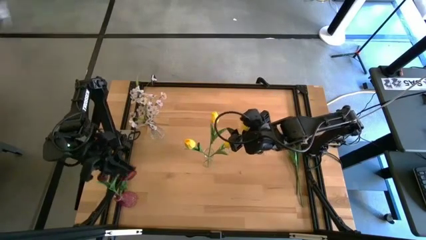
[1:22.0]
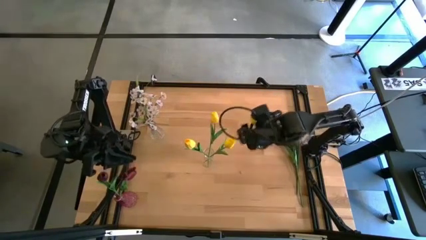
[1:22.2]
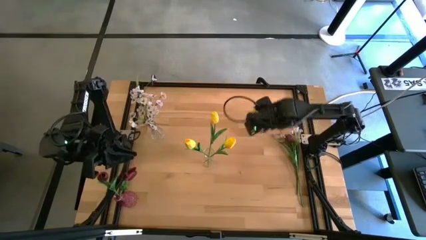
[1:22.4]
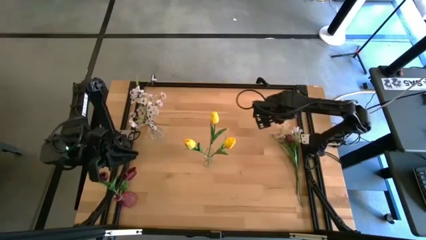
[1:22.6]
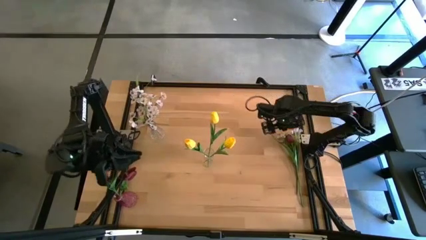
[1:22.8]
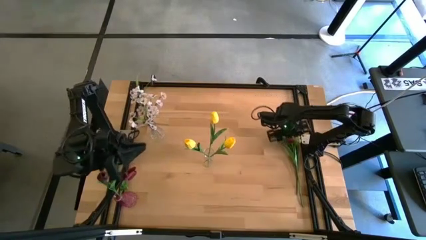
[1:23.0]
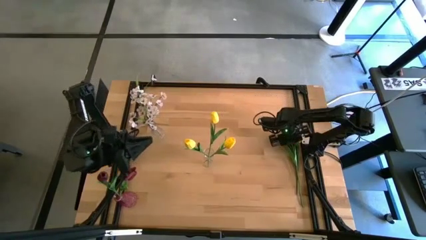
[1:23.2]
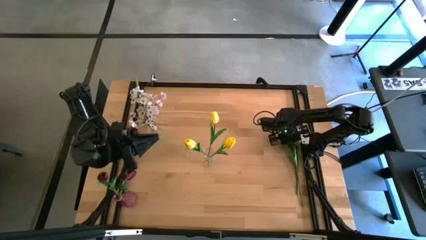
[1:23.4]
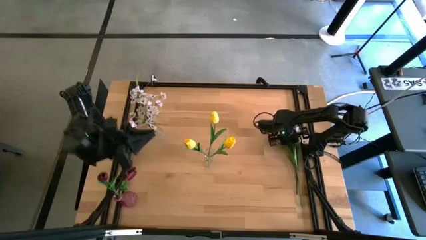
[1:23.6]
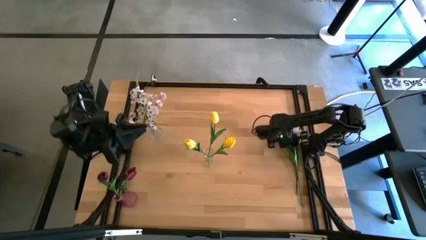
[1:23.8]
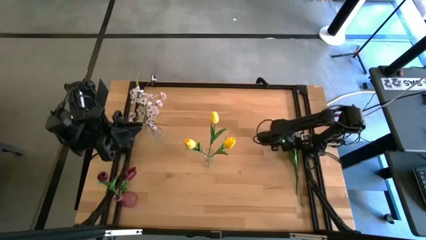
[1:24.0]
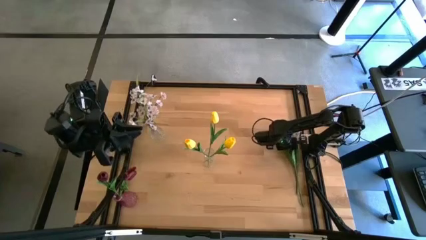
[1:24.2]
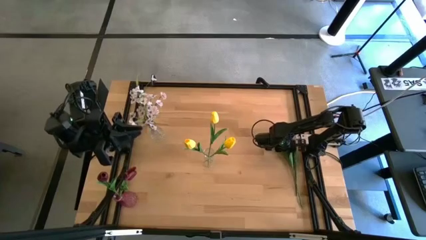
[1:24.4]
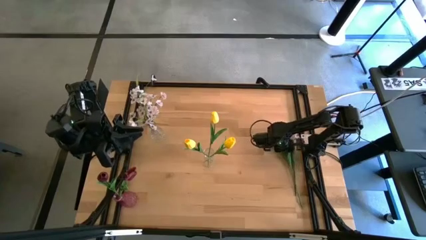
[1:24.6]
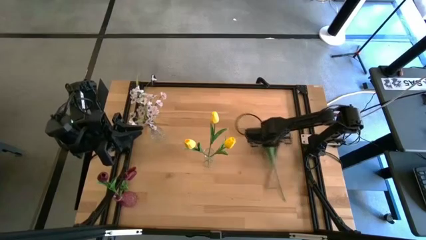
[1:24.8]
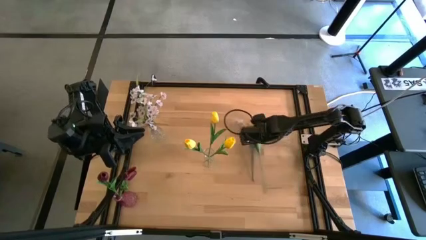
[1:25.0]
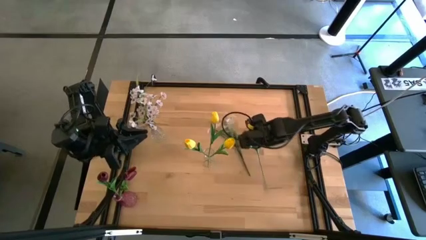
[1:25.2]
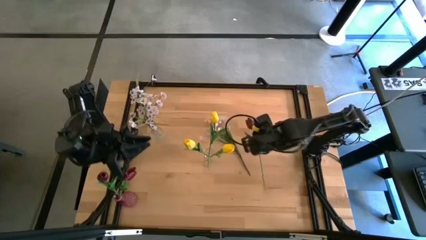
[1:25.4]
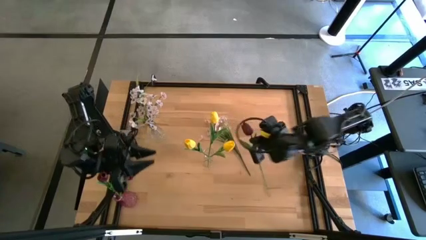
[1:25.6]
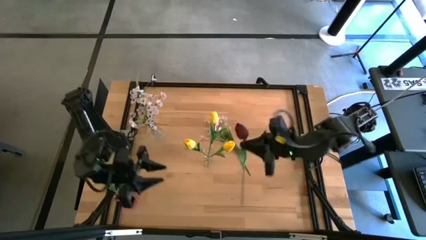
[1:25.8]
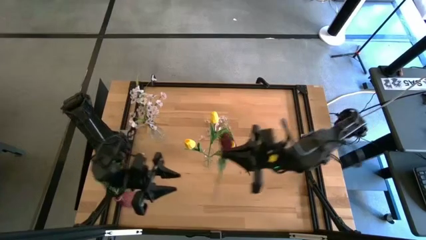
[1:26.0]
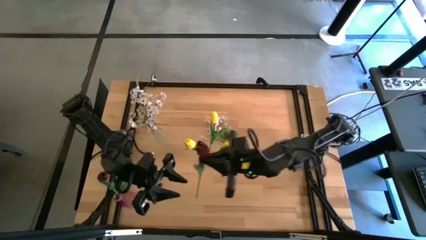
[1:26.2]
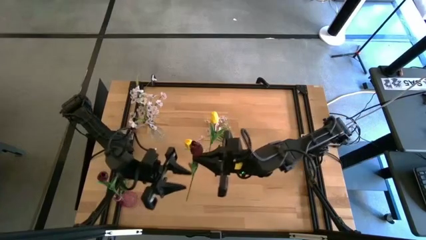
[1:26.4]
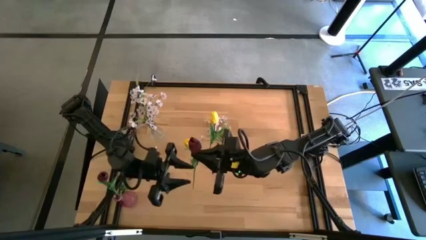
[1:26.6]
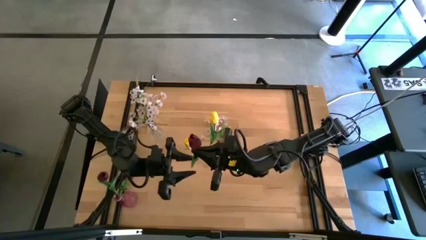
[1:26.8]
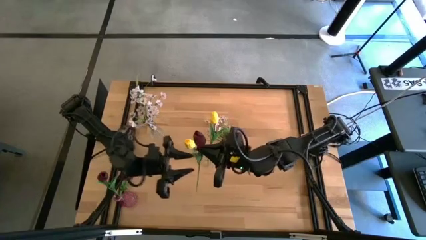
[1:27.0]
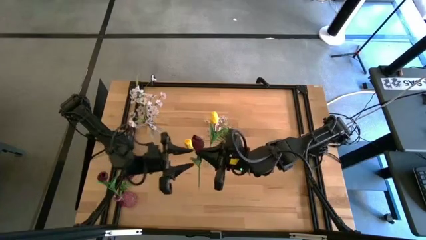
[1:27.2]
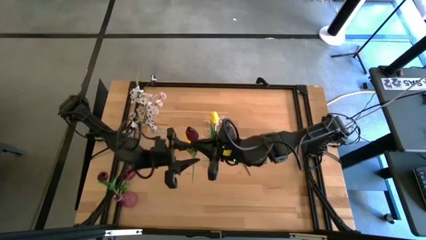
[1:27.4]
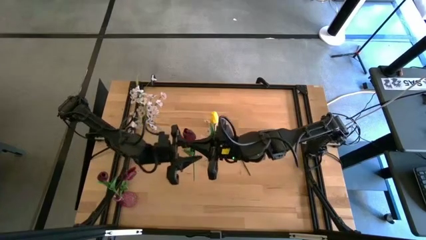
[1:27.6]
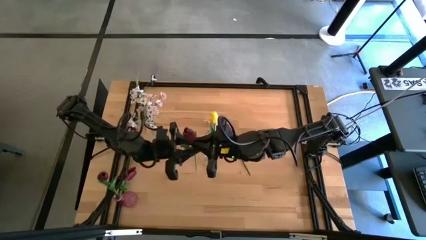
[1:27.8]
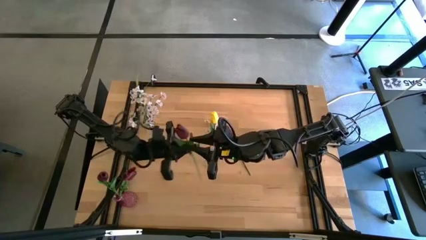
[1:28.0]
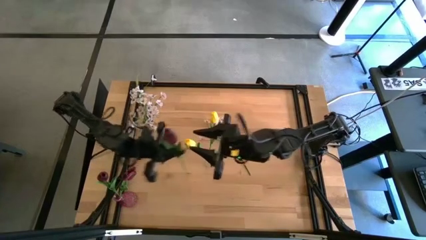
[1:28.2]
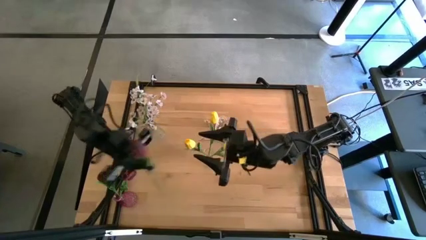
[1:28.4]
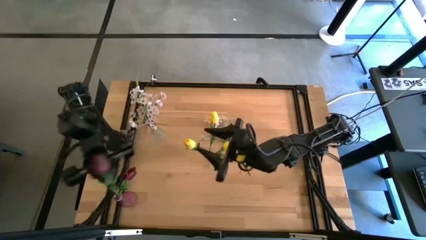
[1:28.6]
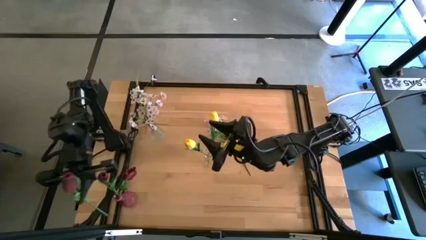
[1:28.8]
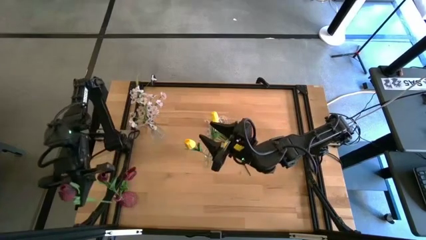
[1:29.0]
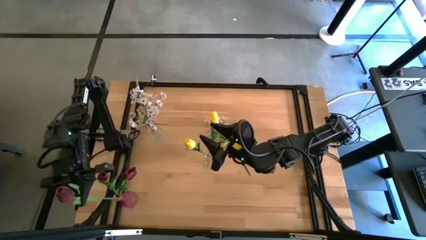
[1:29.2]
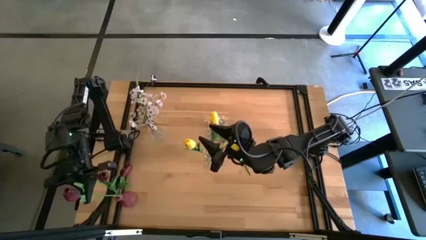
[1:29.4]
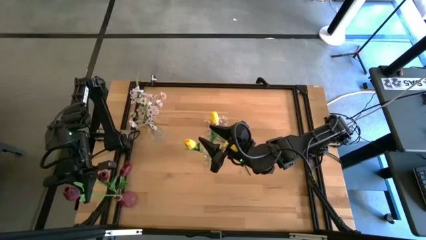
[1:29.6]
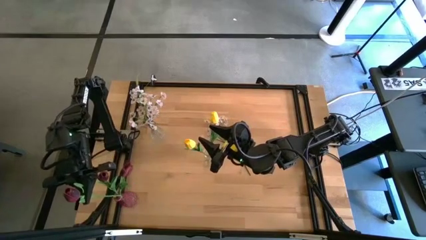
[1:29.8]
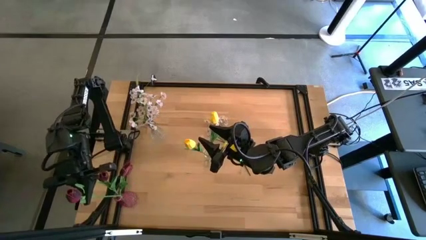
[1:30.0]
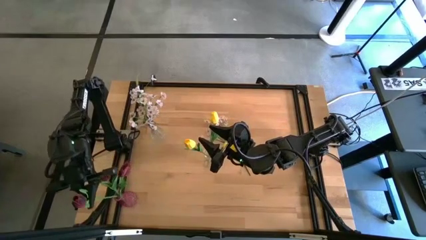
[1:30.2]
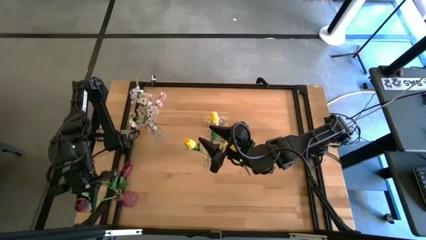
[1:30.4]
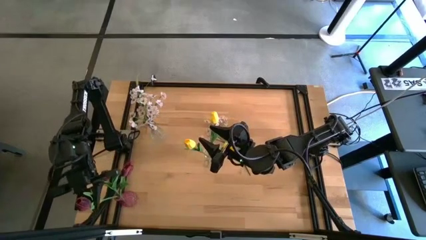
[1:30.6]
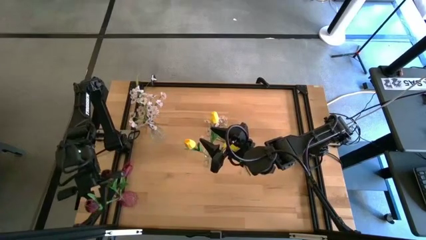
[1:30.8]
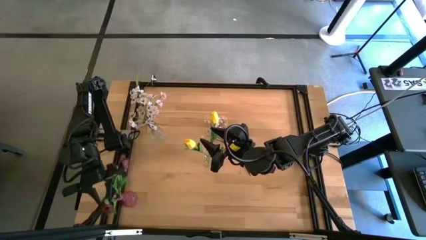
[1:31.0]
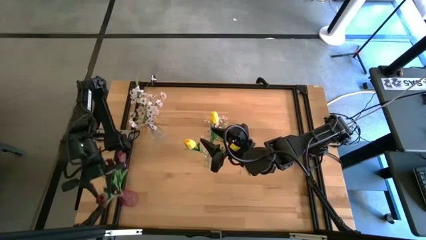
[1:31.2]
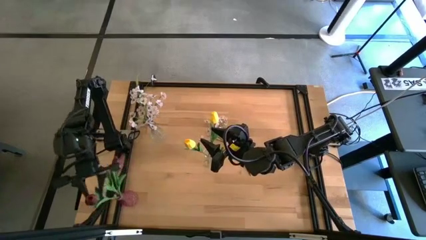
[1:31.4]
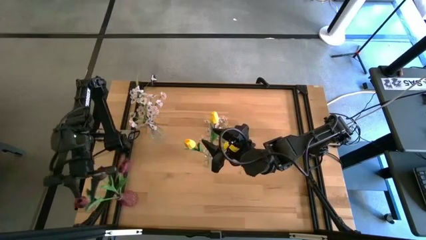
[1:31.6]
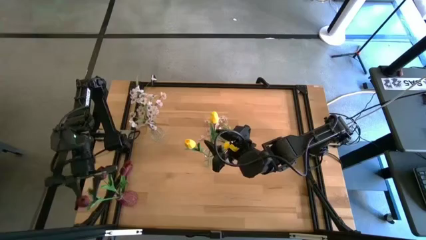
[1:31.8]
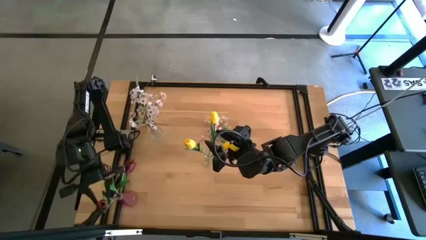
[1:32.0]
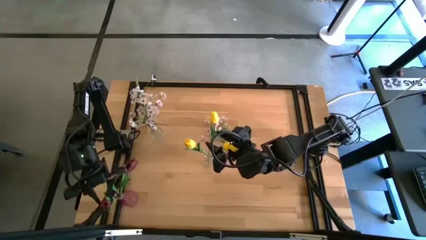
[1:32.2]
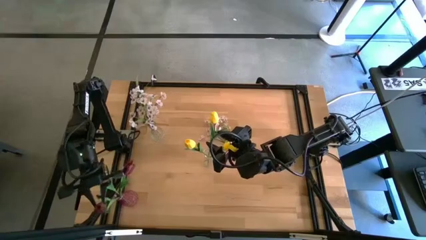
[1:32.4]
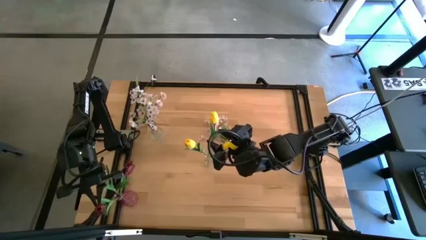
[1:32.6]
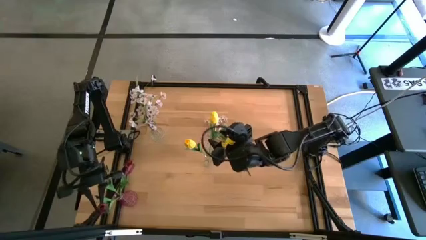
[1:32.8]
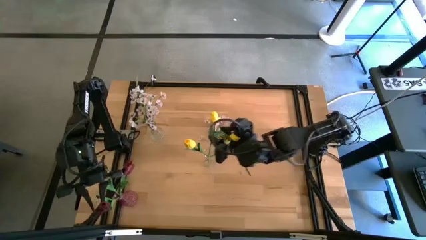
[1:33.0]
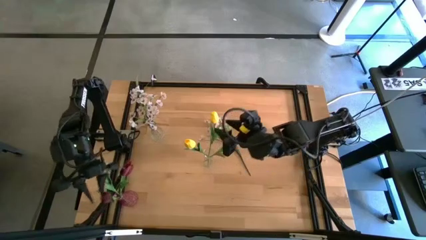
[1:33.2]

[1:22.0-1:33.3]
Task: Sort flowers into vase by color
Put the dark red flower into the purple vase
